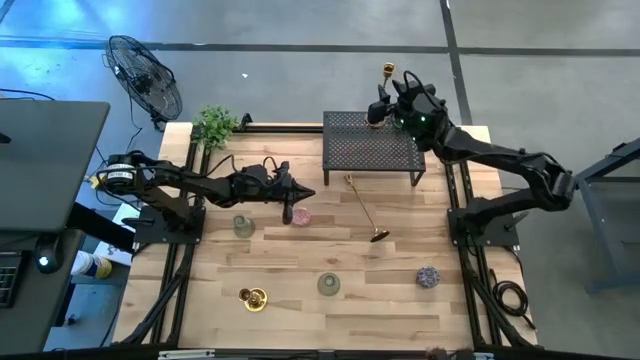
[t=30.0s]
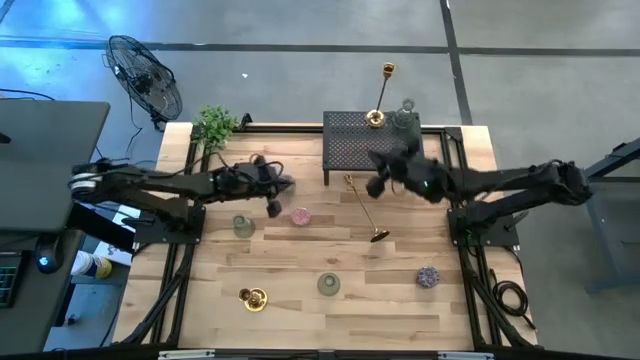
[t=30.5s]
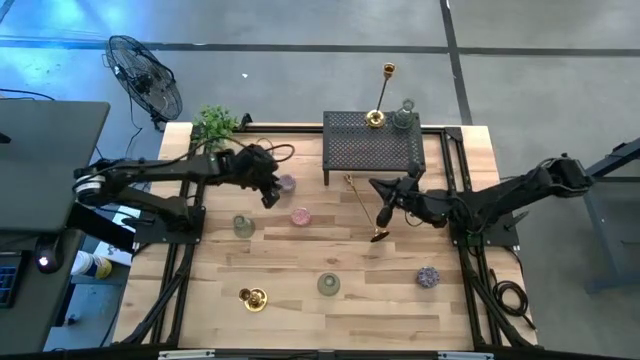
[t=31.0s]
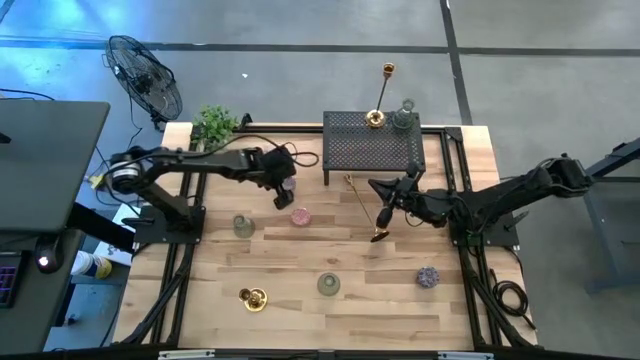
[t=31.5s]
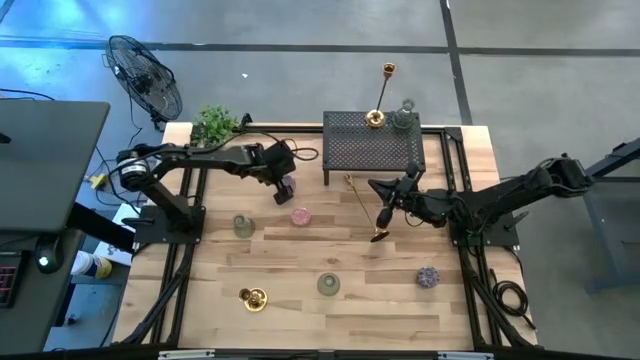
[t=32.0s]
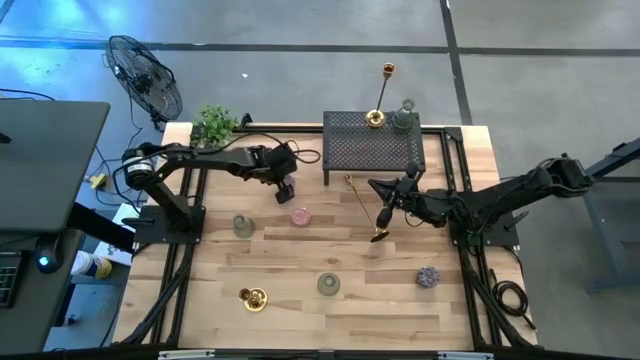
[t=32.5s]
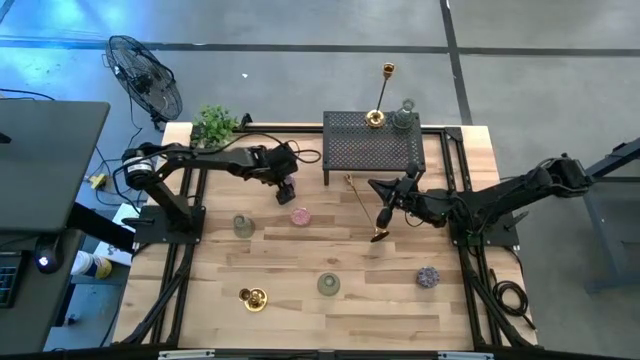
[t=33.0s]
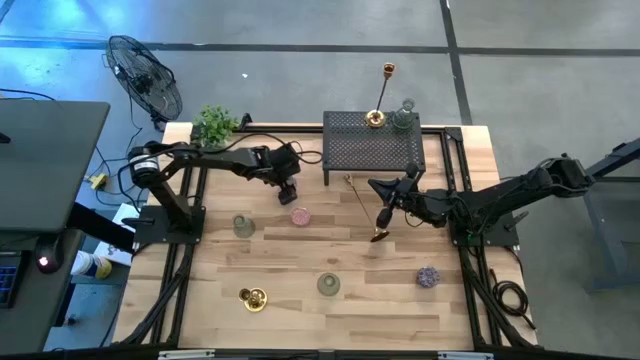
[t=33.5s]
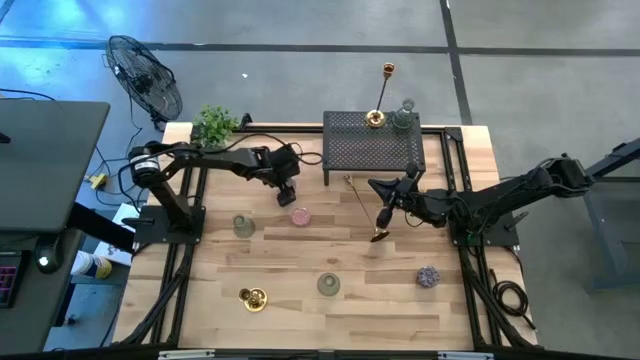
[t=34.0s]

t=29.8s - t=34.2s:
Task: Pick & Place candle stick holders
Put the red patterned scented candle on the shelf

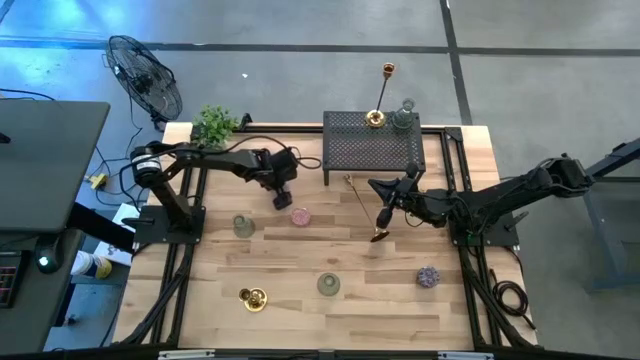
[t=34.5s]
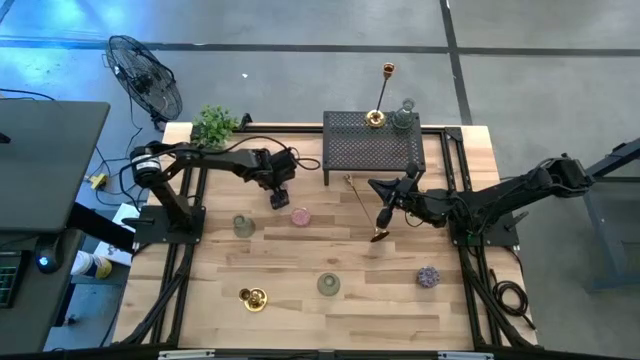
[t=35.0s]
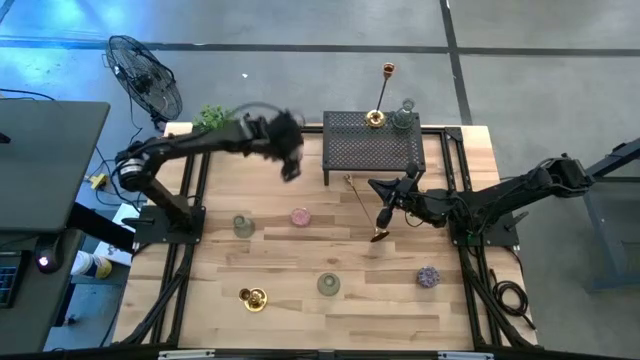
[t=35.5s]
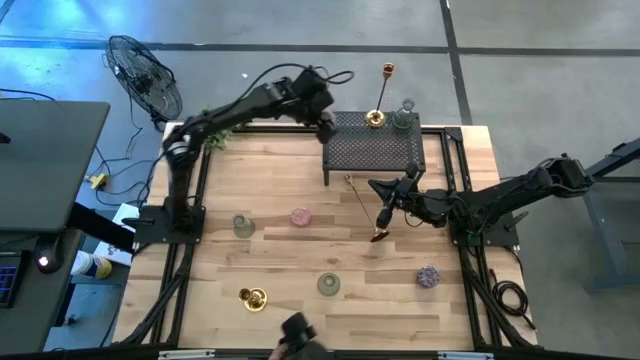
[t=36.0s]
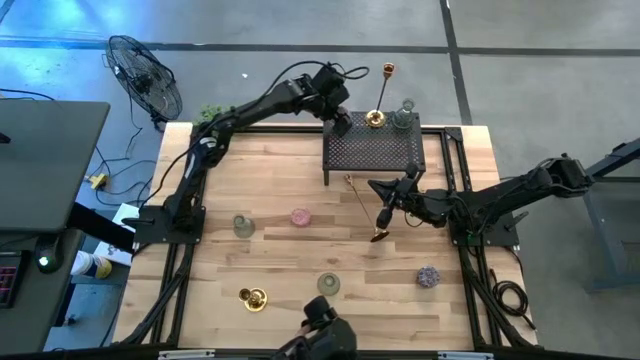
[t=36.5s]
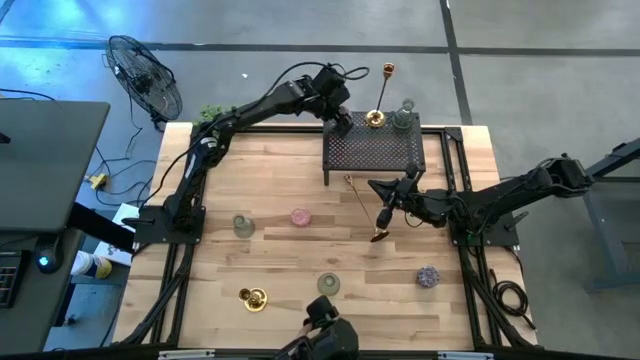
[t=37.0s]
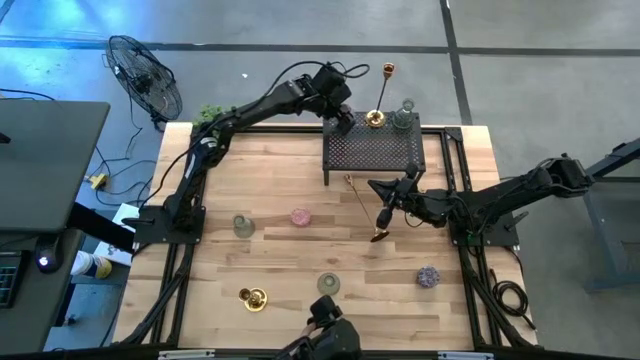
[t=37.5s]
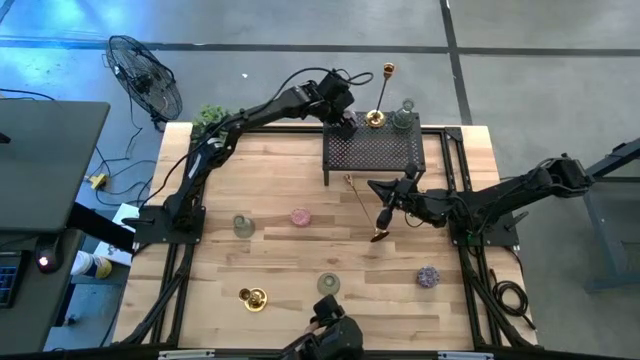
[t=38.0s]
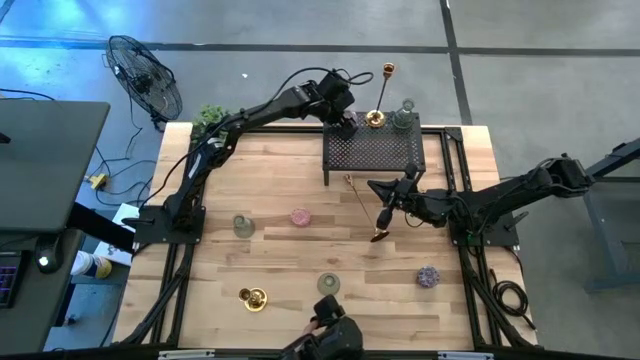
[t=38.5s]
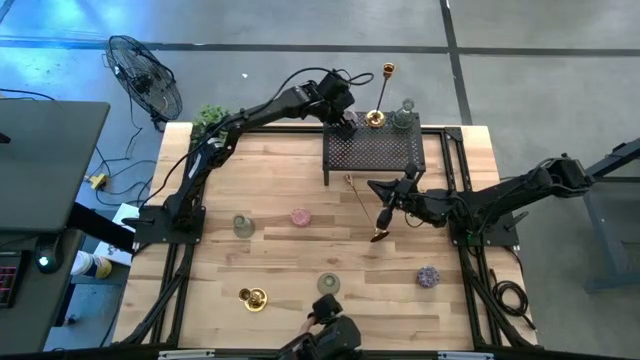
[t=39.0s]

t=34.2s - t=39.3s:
Put the red patterned scented candle on the shelf

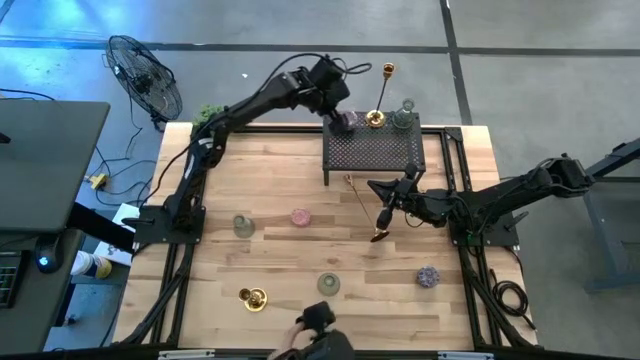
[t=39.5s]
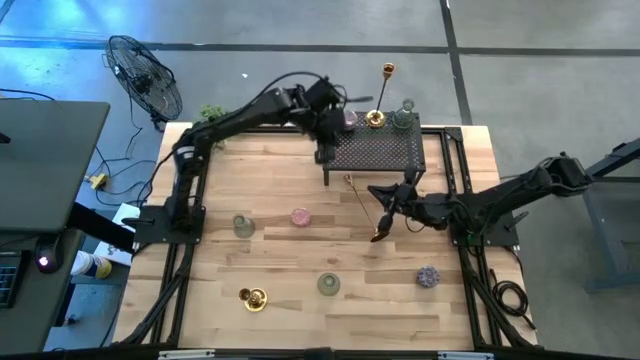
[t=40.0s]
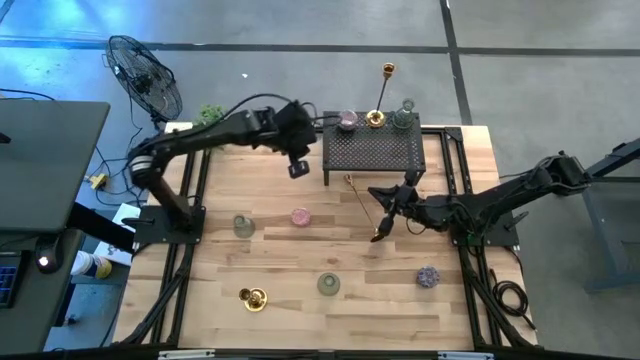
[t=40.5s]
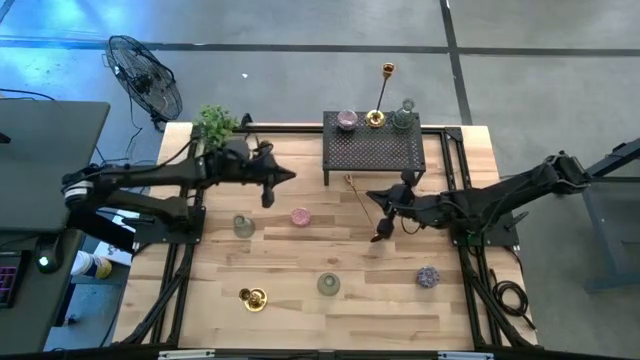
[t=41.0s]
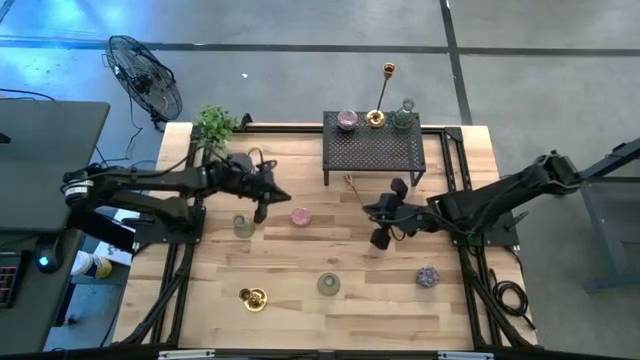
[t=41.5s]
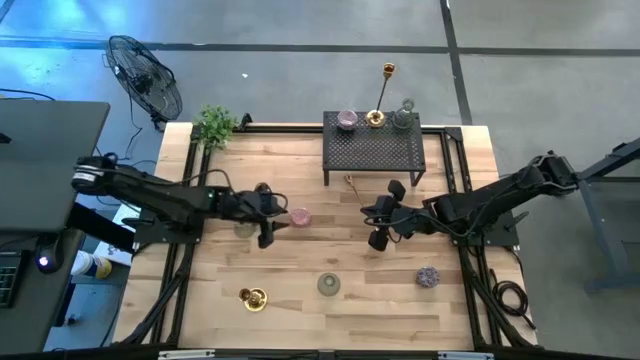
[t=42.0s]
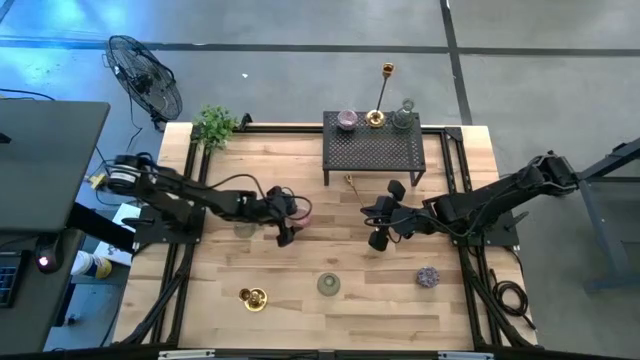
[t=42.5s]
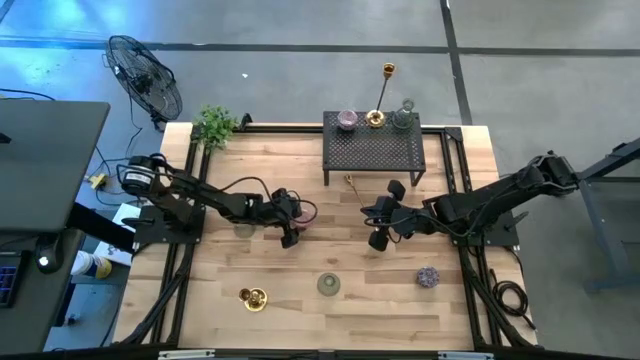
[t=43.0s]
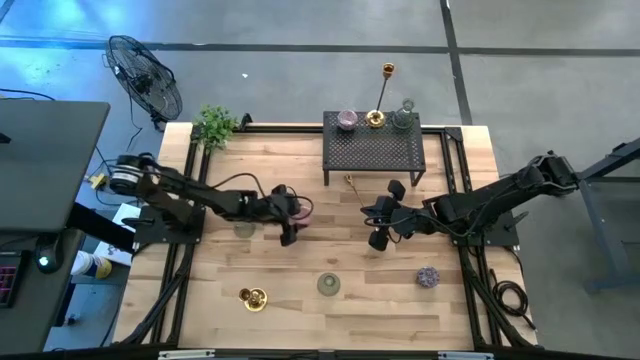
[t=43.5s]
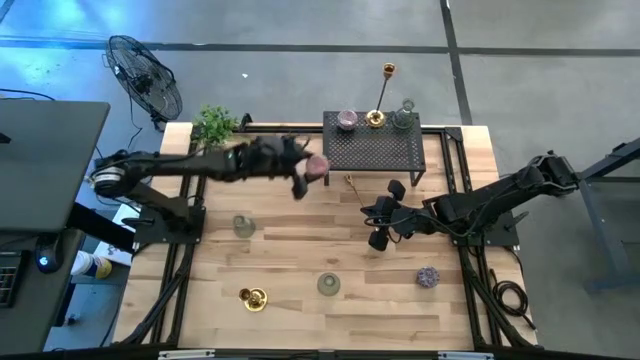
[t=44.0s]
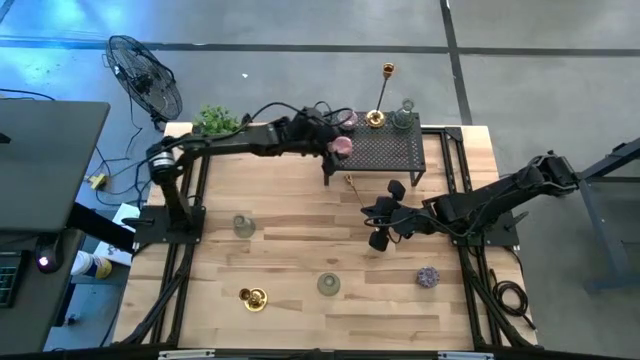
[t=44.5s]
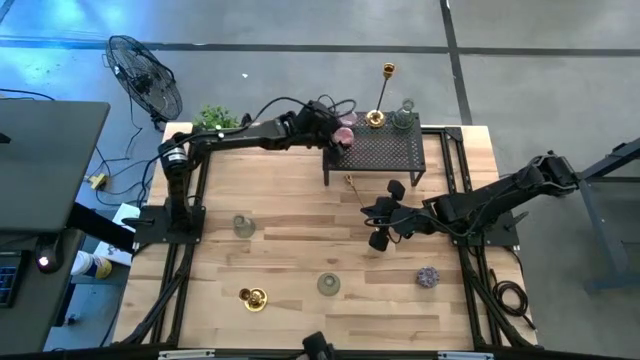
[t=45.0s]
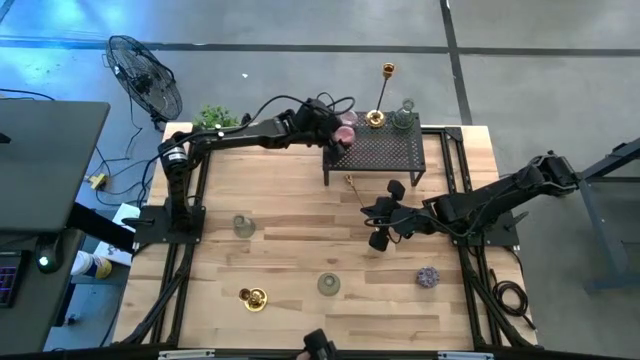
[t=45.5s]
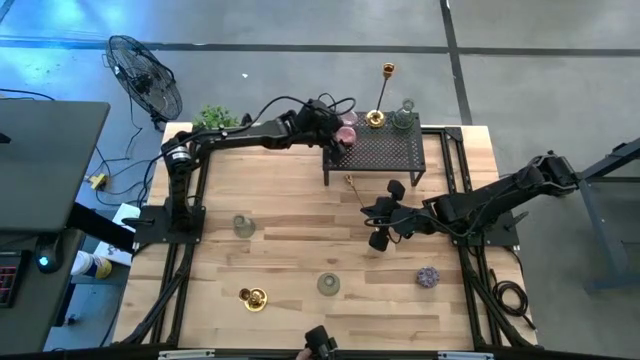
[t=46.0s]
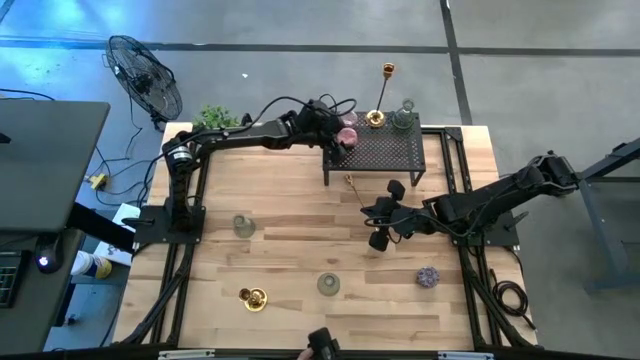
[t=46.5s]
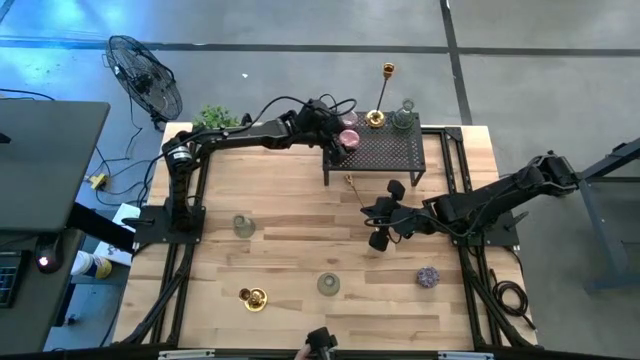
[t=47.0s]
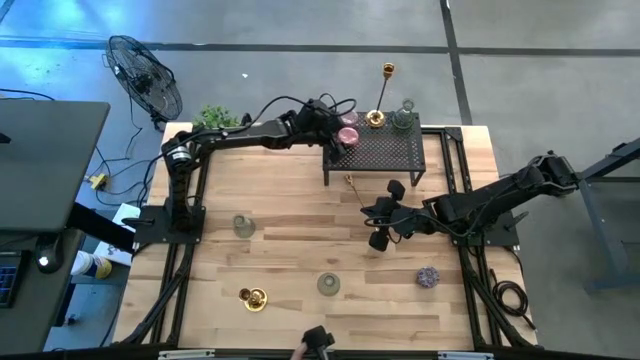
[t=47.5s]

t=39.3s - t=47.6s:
Put the pink patterned scented candle on the shelf aligned with the red patterned scented candle

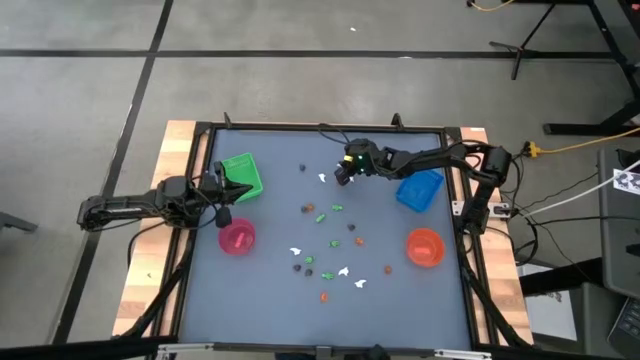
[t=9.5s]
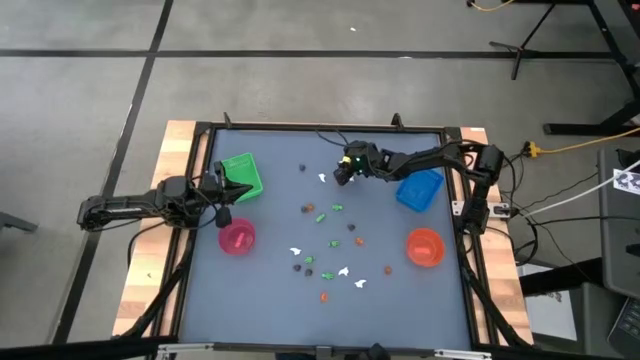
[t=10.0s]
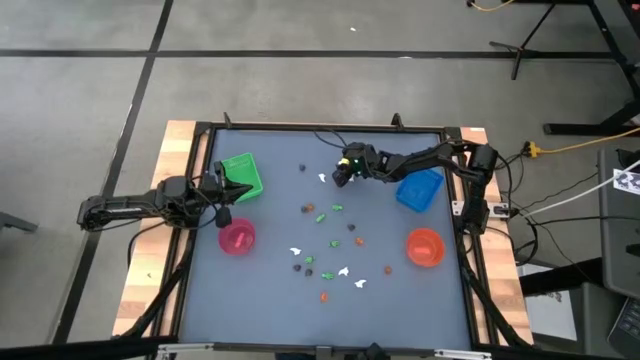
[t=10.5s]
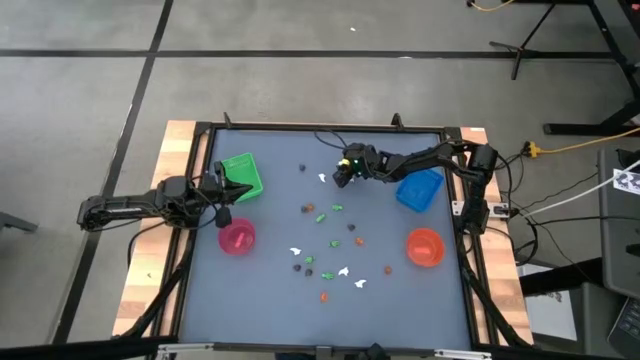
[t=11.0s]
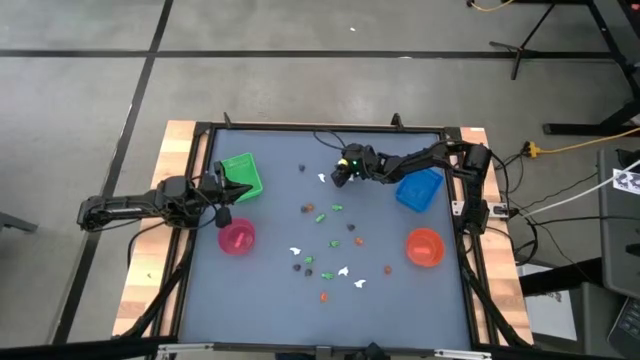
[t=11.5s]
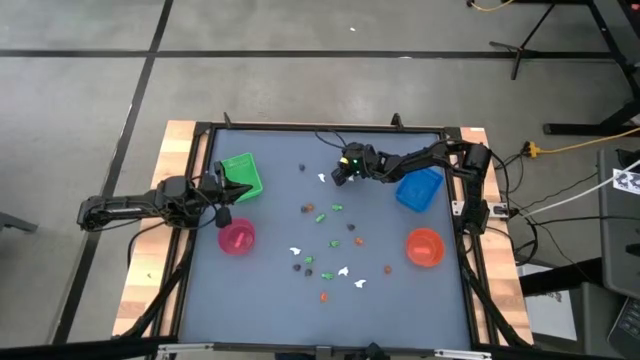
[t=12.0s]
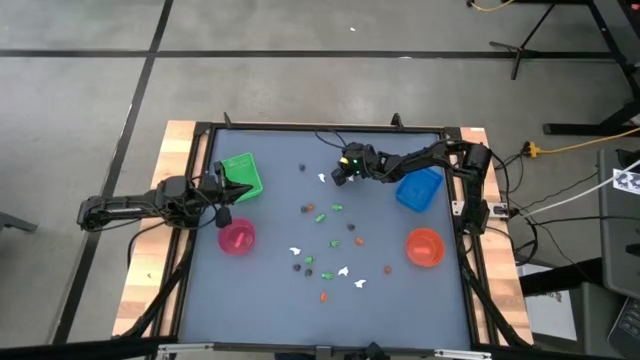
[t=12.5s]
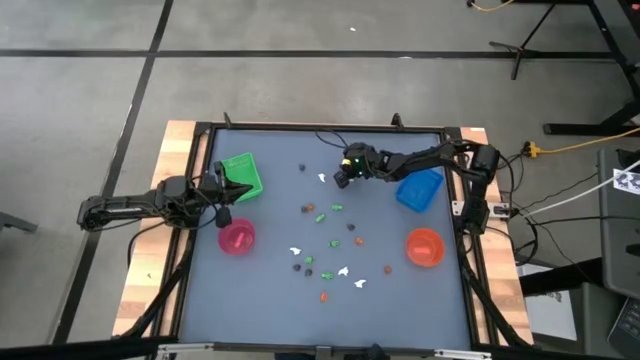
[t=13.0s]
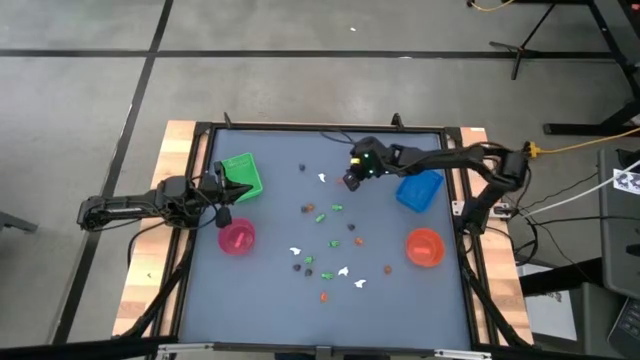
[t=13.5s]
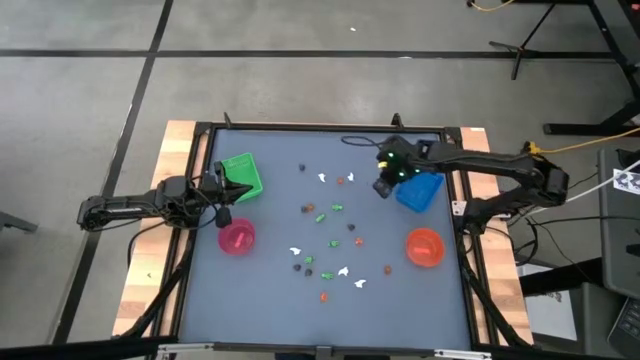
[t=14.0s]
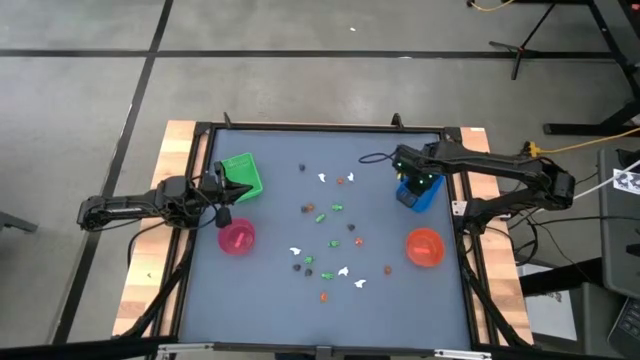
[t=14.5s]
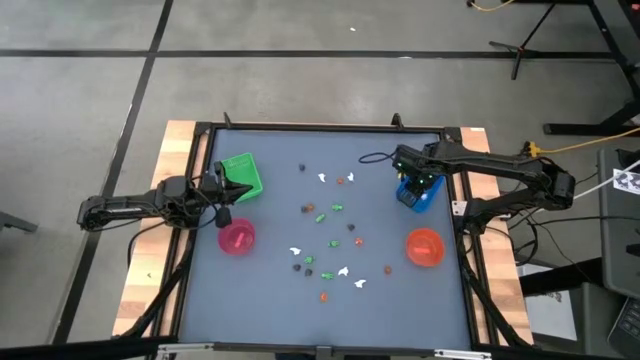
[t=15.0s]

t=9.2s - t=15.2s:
Task: Sort Halloween decoration
Put the small white ghost toy into the blue basket
